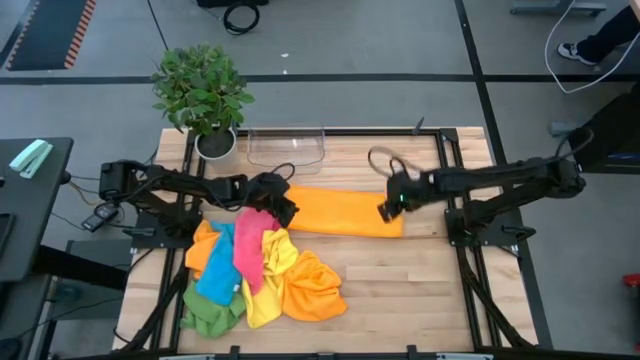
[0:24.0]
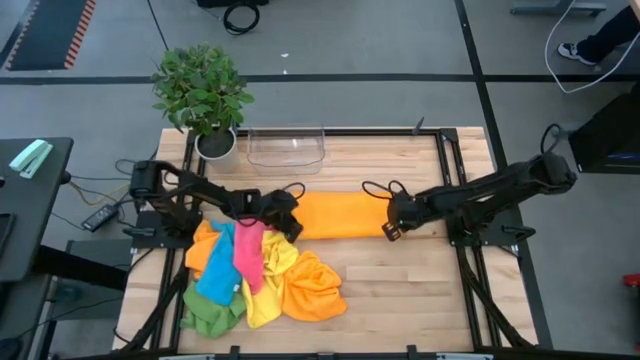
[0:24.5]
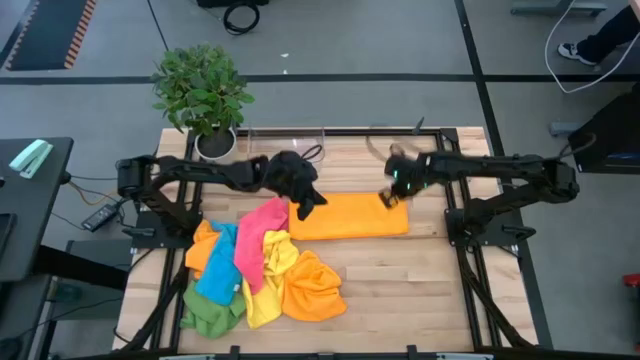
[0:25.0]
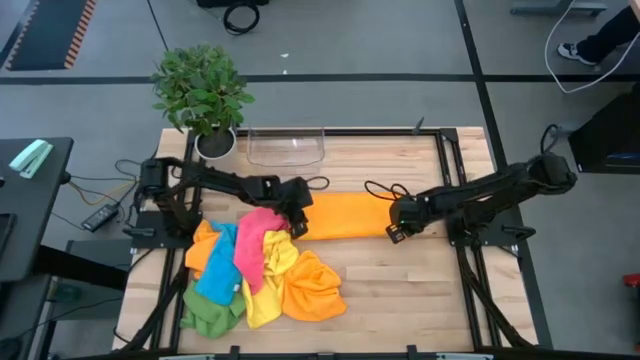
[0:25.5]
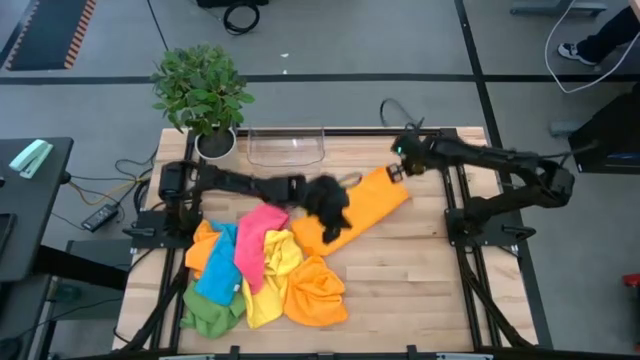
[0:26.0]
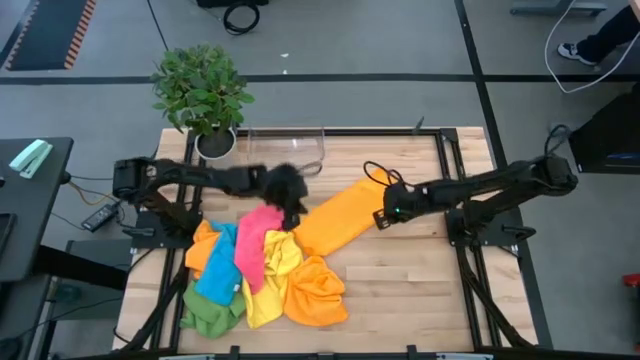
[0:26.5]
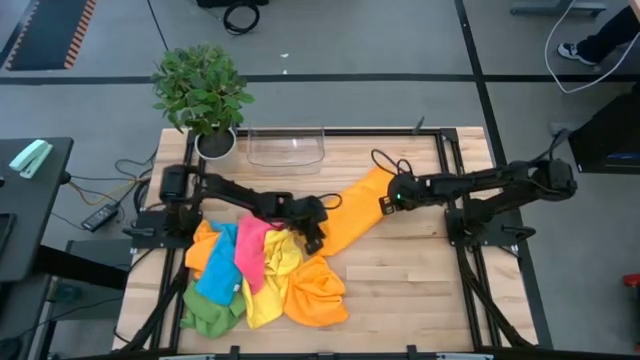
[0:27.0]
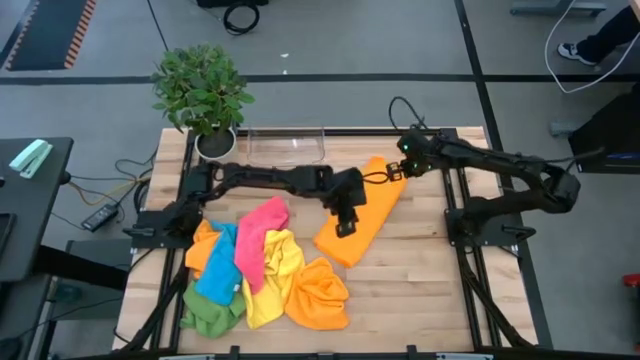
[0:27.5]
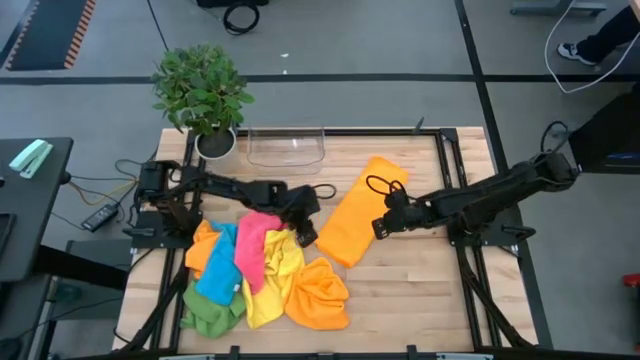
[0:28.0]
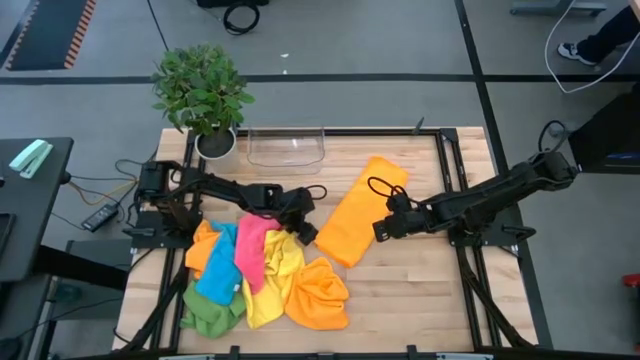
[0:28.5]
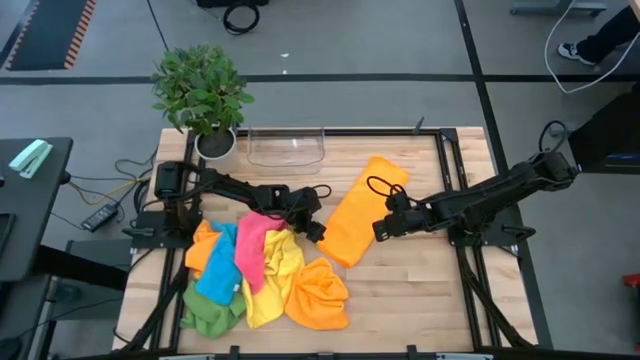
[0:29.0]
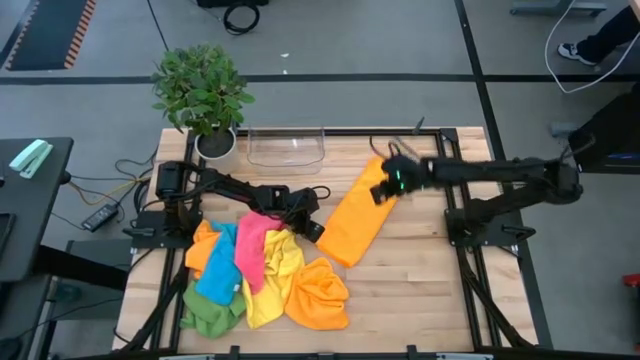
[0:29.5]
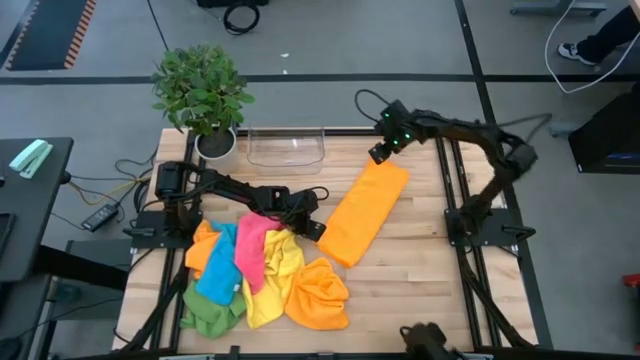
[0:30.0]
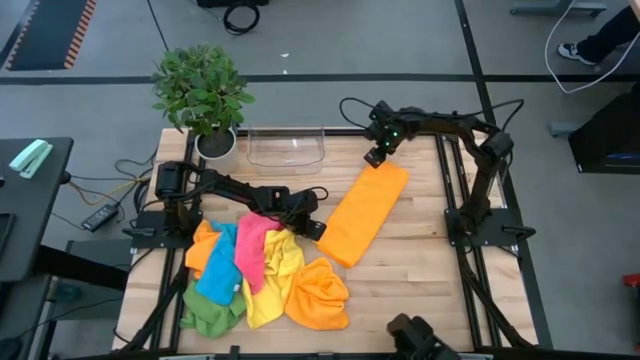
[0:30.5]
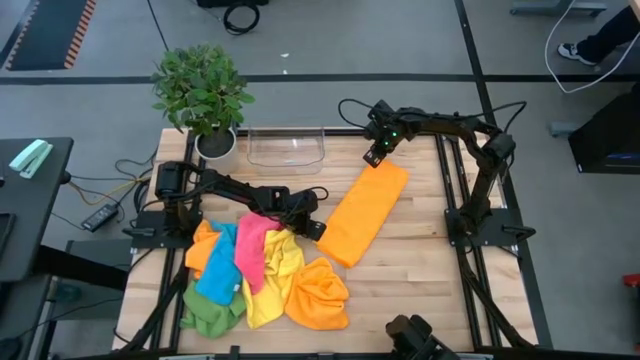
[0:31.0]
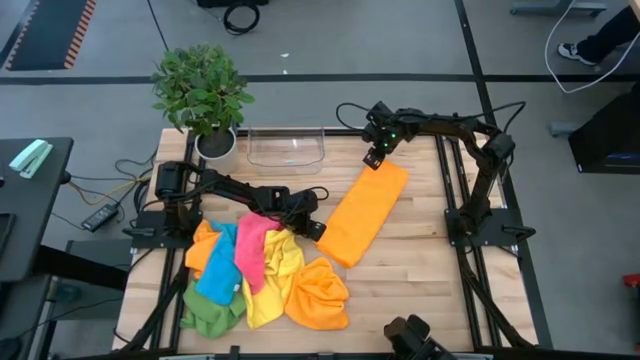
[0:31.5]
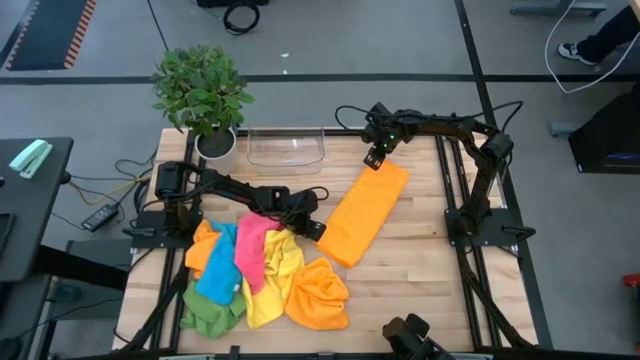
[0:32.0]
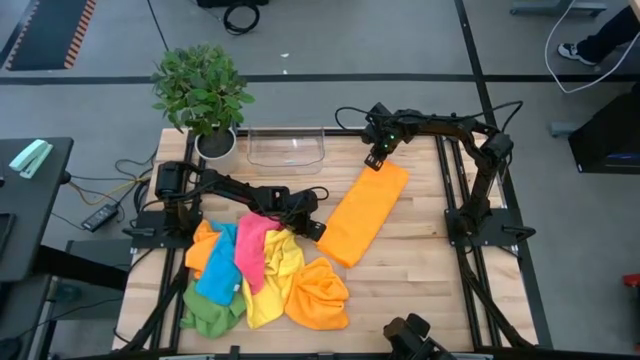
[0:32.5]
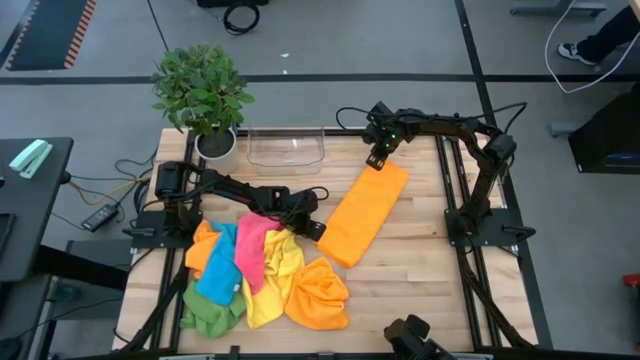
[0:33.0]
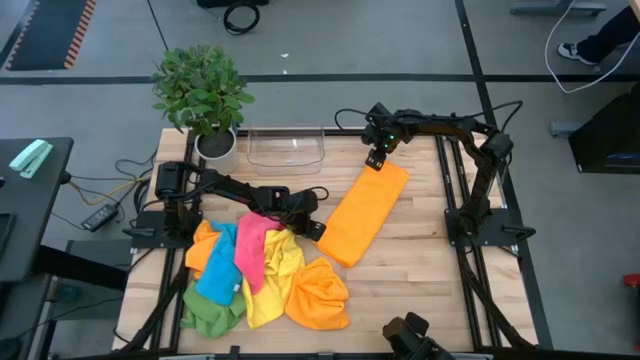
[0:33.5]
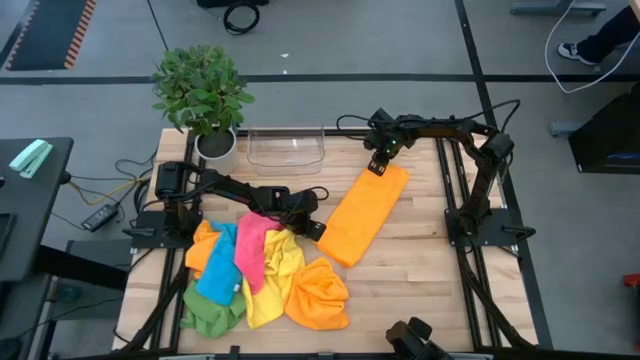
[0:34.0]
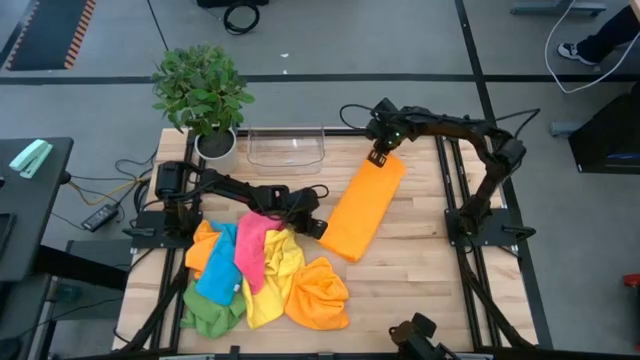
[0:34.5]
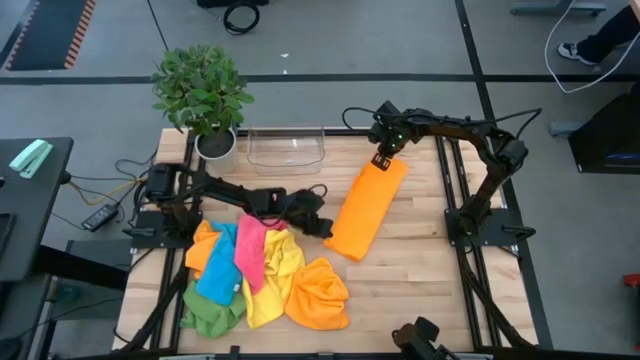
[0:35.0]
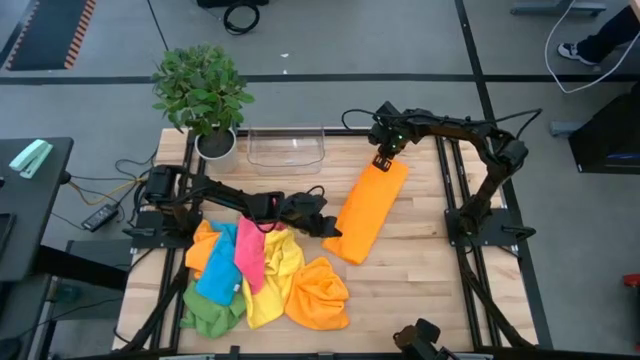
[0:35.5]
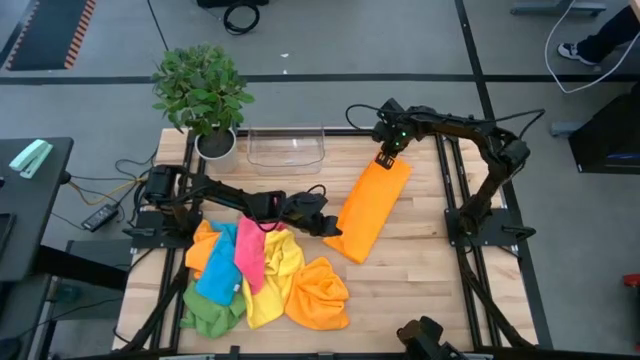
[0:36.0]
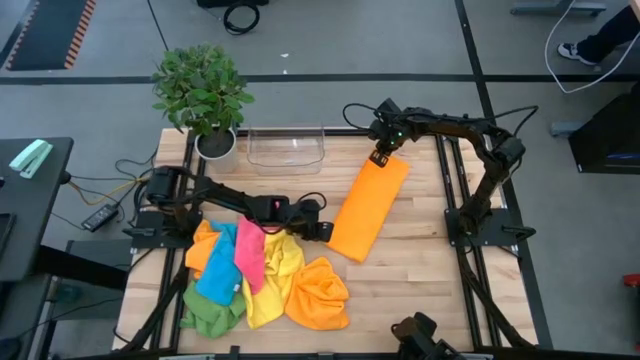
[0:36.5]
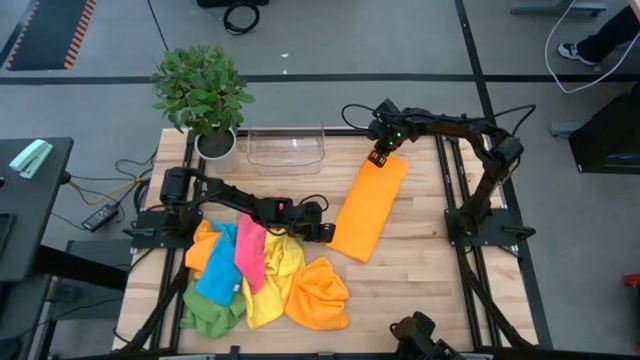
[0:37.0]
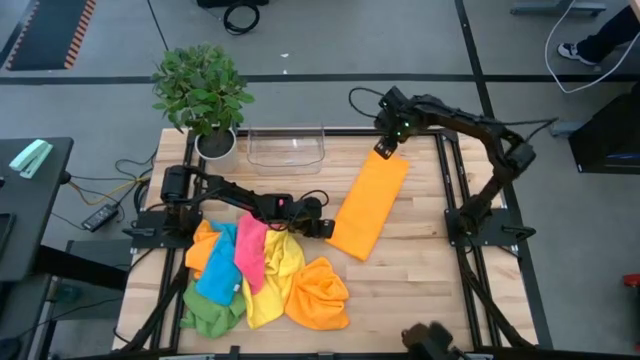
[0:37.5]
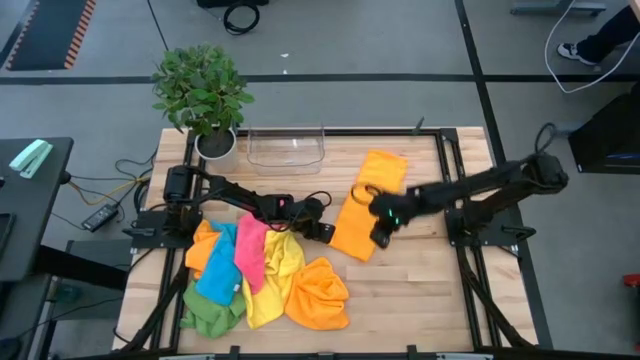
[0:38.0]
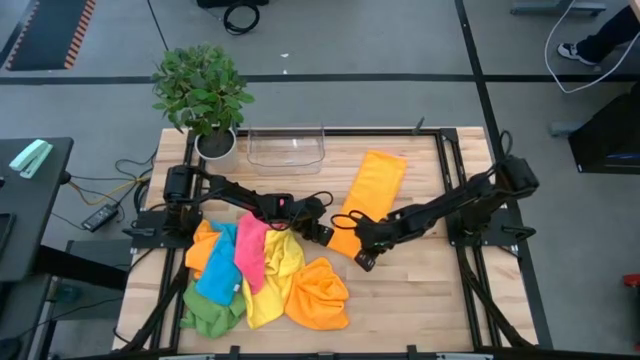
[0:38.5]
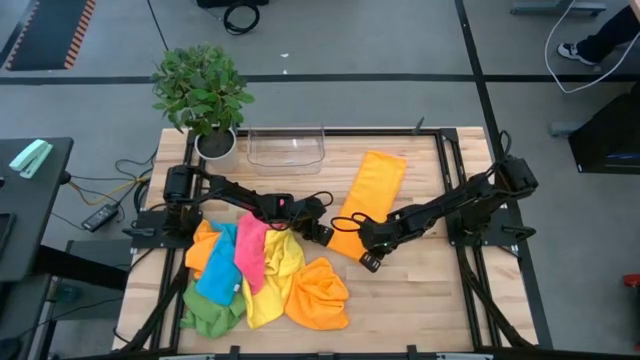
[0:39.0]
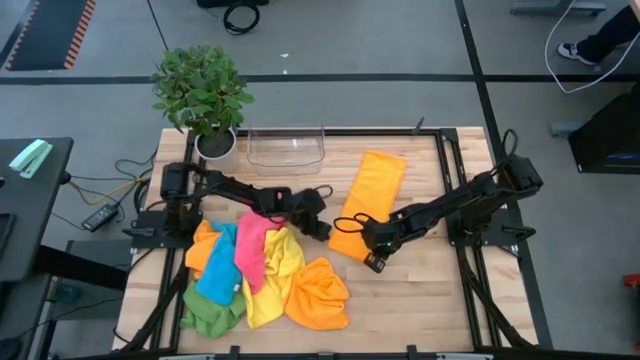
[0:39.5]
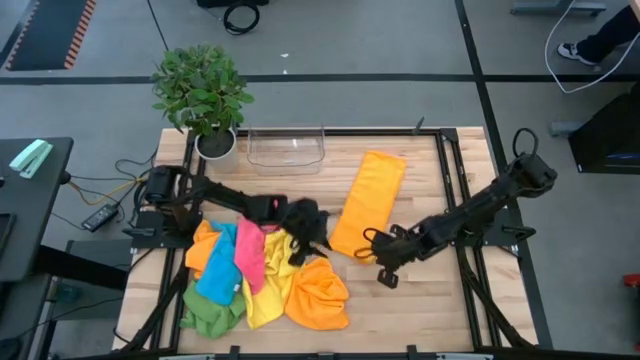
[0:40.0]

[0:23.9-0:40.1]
Task: Fold microfiber towels
Fold the top right orange microfiber cloth

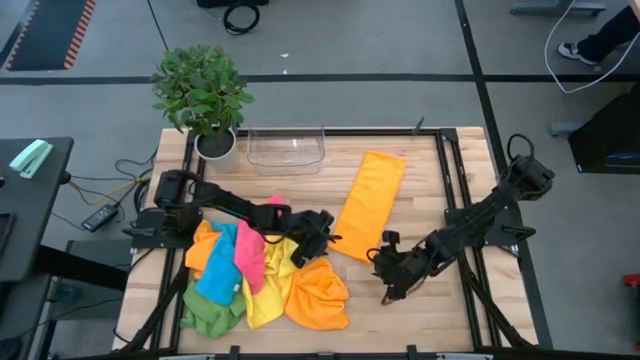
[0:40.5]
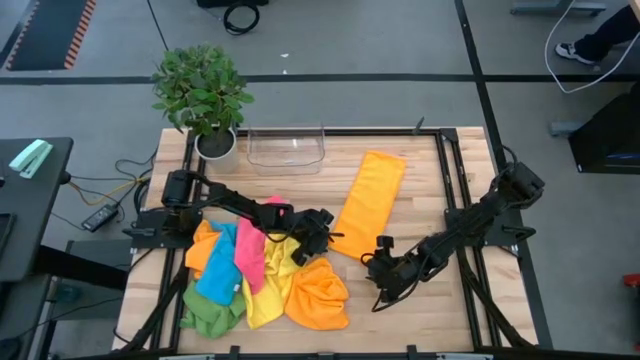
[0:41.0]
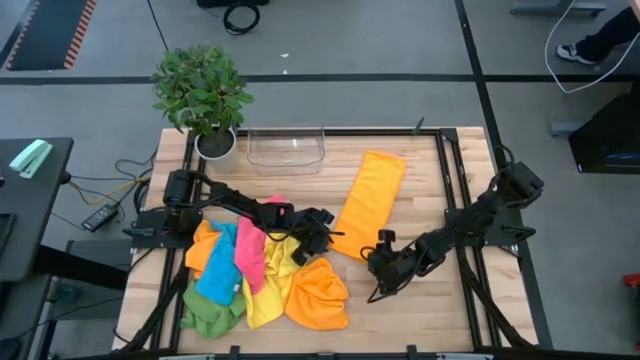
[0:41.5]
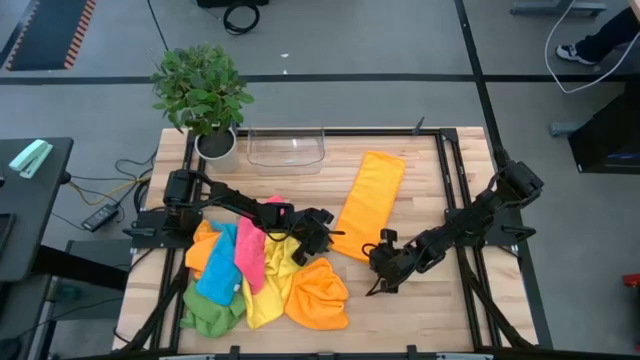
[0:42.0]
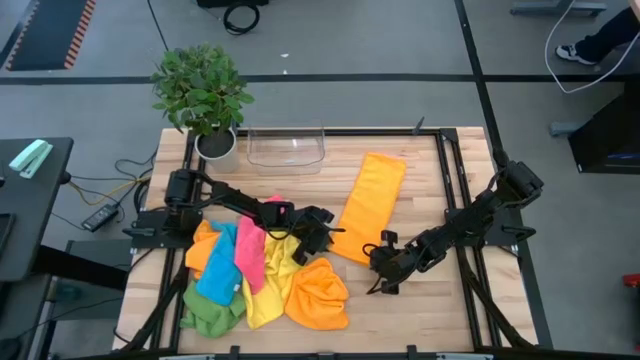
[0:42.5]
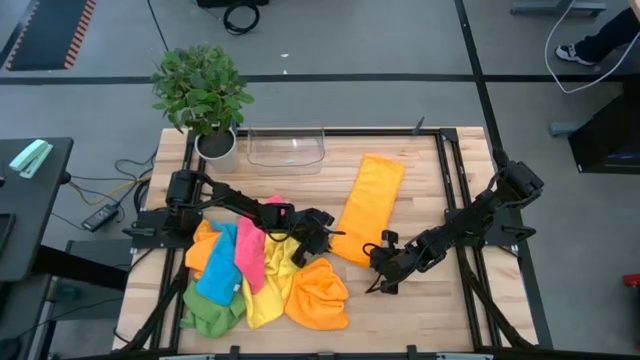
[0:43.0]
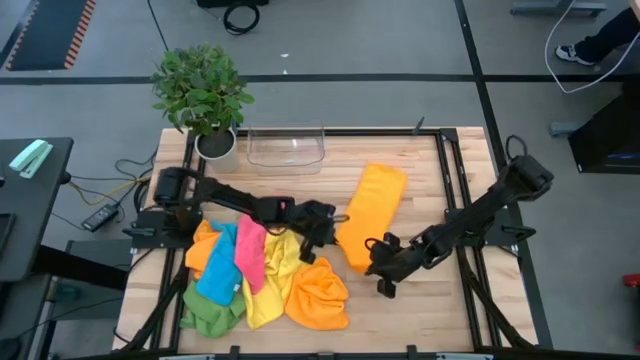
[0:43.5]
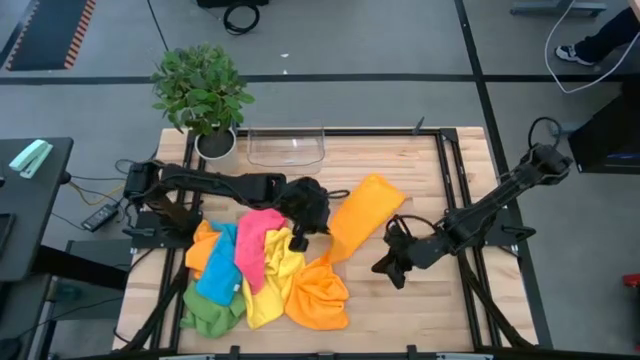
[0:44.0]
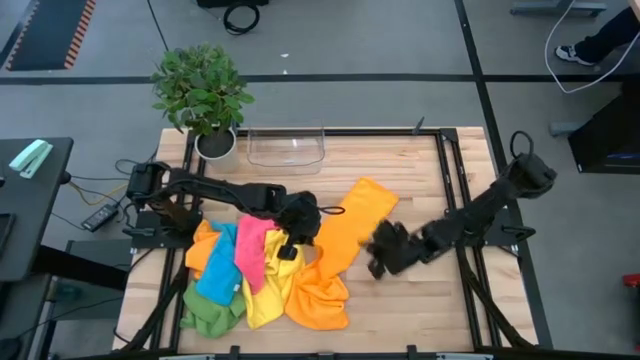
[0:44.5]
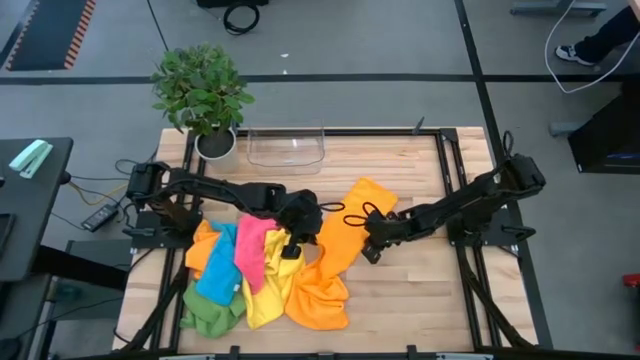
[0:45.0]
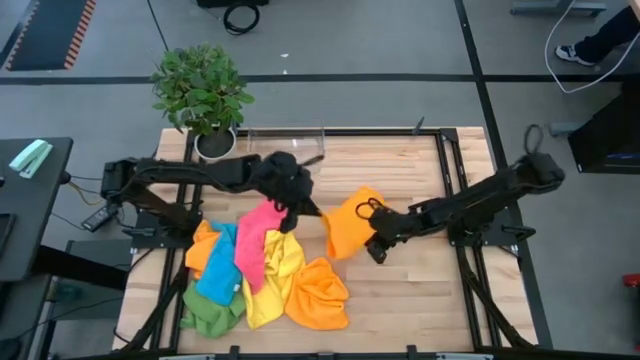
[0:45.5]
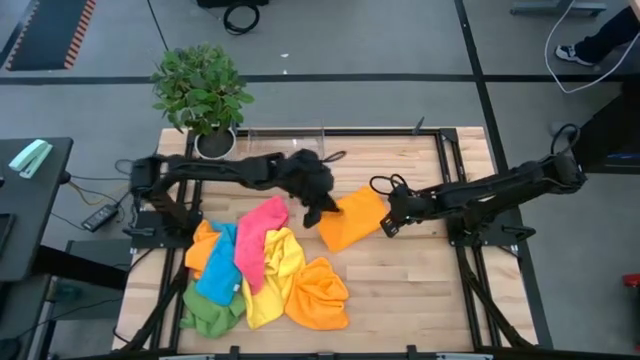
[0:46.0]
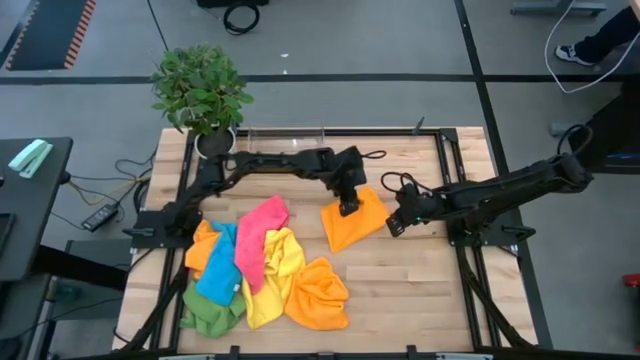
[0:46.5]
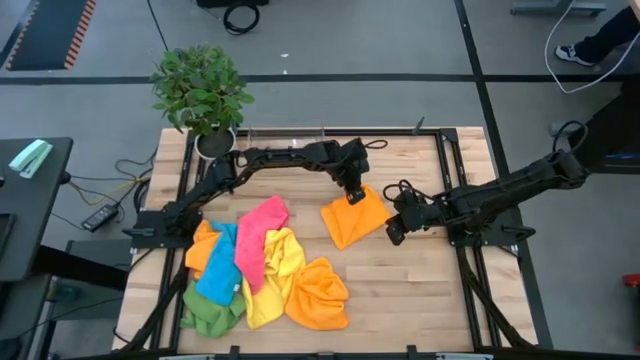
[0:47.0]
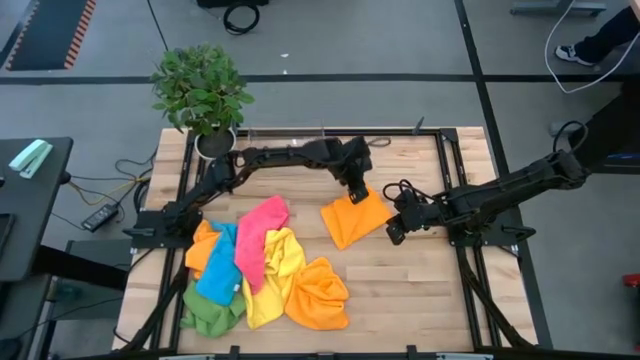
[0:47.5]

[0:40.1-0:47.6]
Fold the top right orange microfiber cloth
